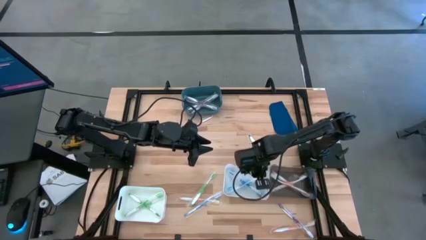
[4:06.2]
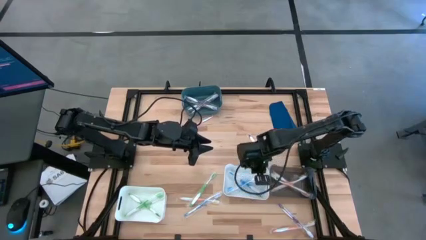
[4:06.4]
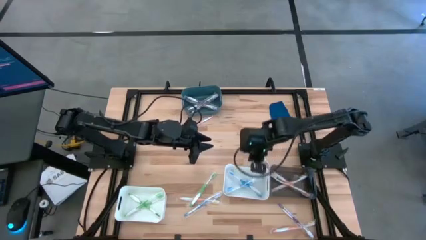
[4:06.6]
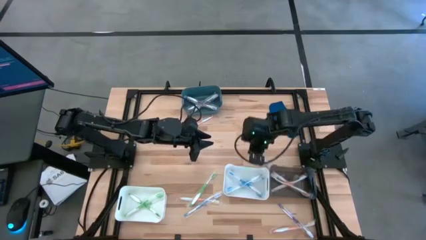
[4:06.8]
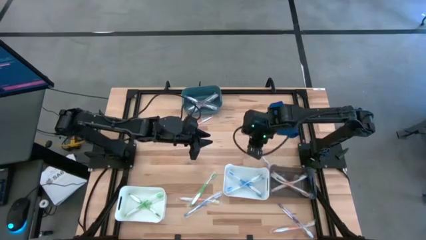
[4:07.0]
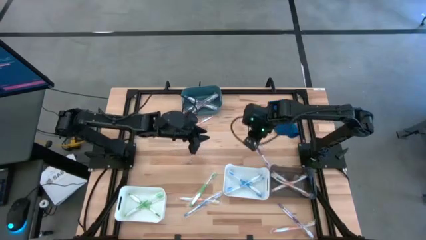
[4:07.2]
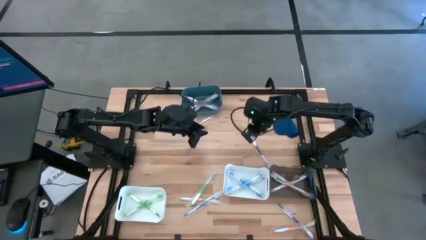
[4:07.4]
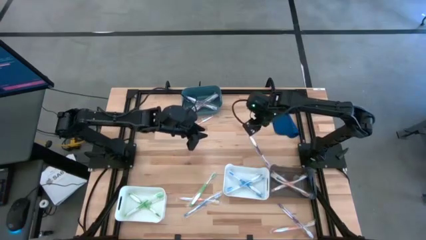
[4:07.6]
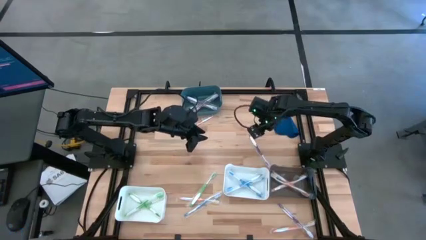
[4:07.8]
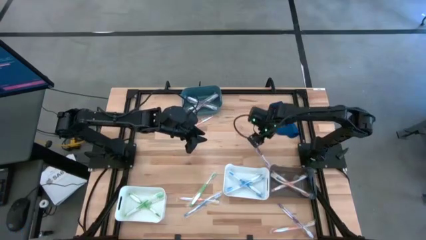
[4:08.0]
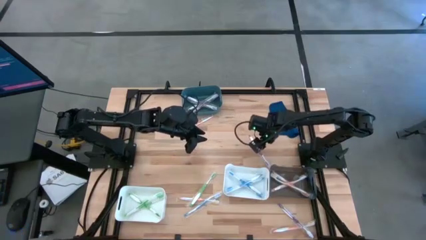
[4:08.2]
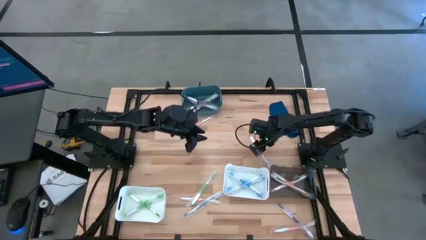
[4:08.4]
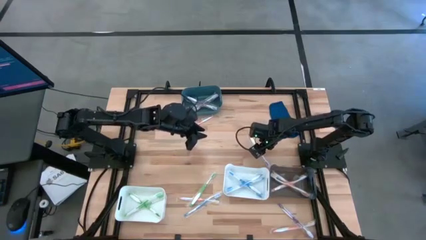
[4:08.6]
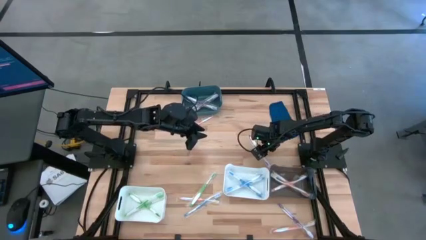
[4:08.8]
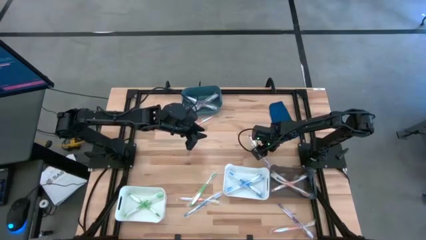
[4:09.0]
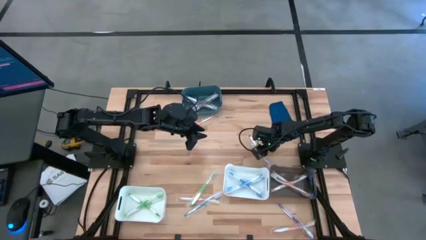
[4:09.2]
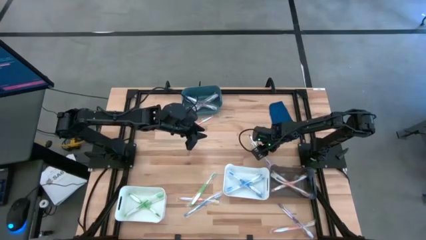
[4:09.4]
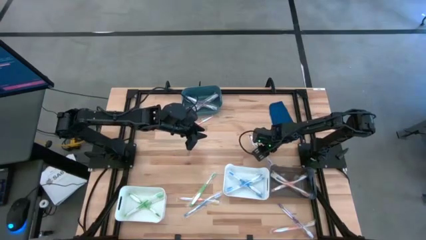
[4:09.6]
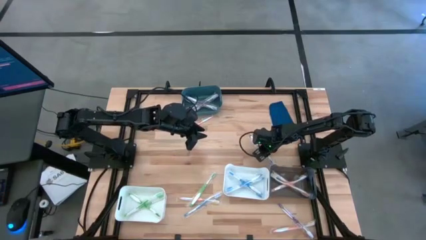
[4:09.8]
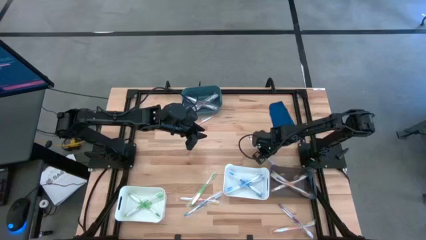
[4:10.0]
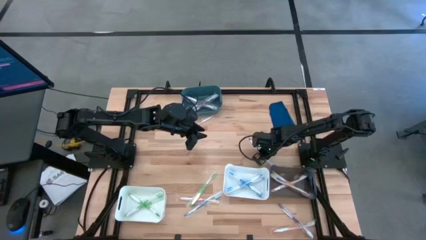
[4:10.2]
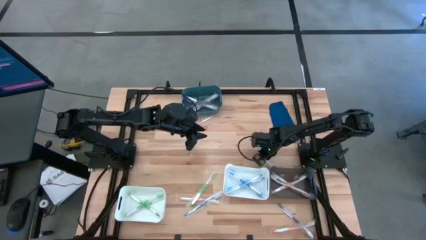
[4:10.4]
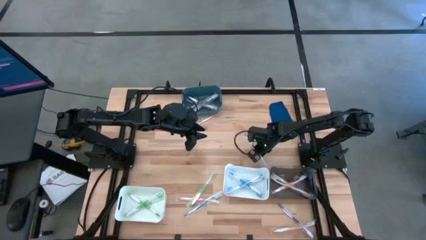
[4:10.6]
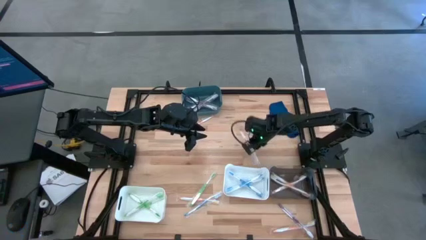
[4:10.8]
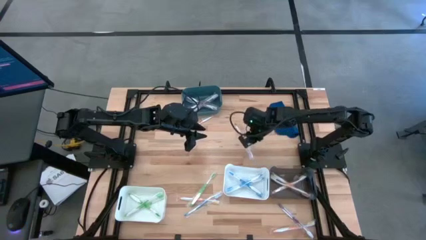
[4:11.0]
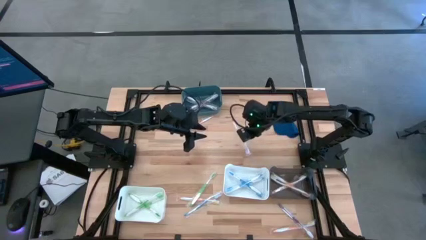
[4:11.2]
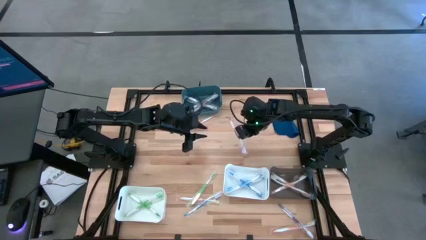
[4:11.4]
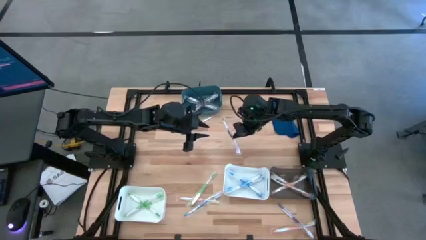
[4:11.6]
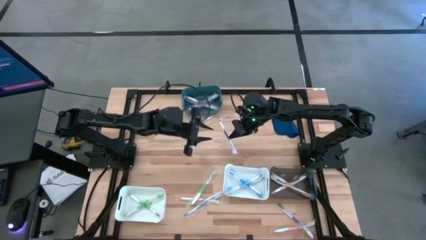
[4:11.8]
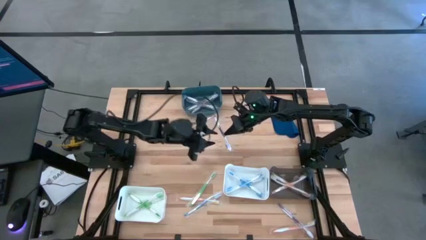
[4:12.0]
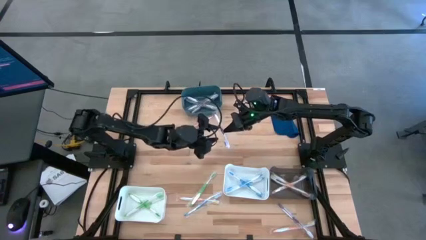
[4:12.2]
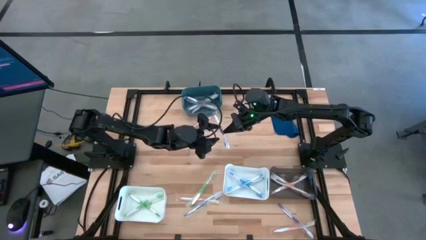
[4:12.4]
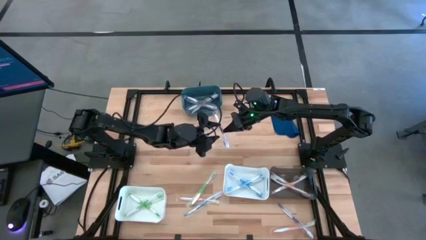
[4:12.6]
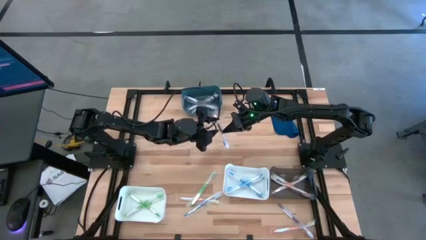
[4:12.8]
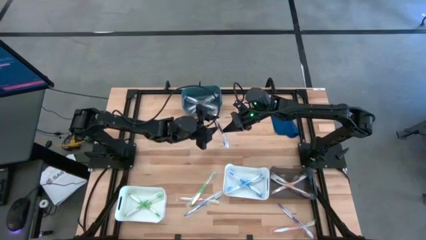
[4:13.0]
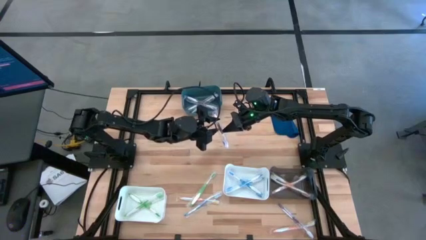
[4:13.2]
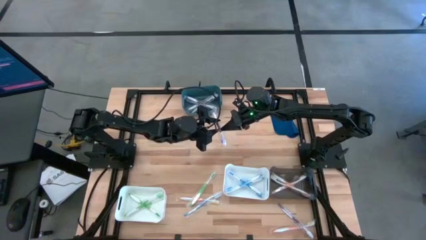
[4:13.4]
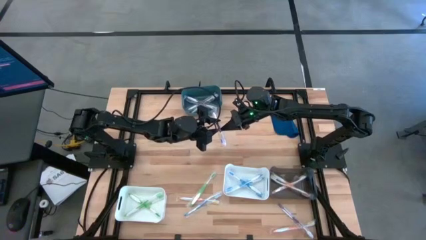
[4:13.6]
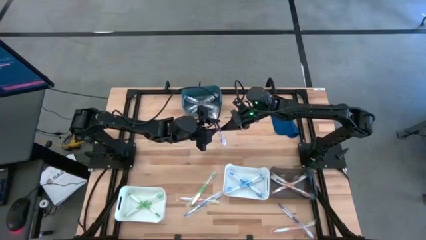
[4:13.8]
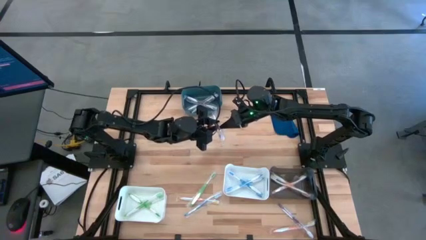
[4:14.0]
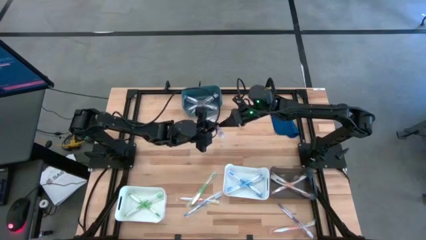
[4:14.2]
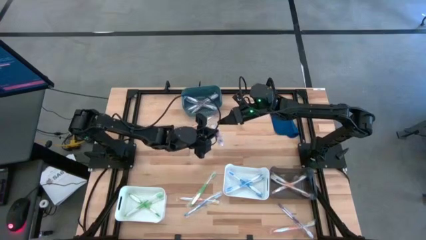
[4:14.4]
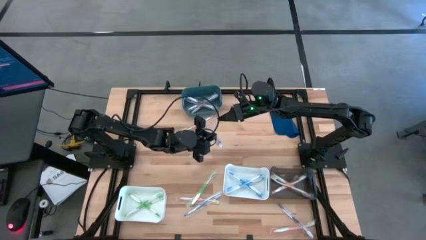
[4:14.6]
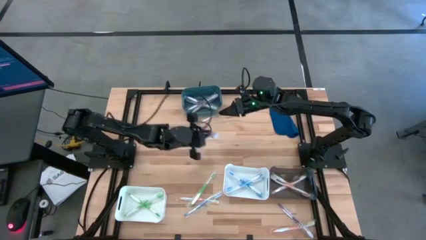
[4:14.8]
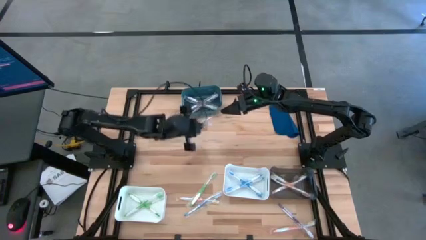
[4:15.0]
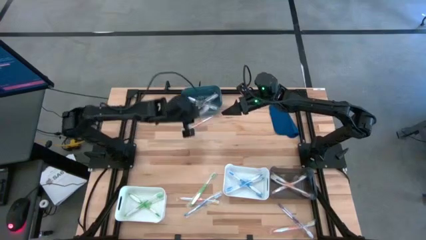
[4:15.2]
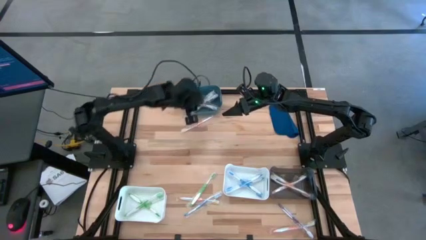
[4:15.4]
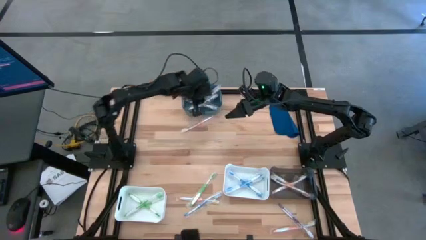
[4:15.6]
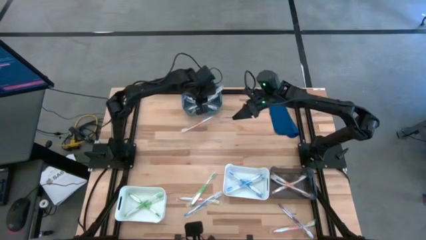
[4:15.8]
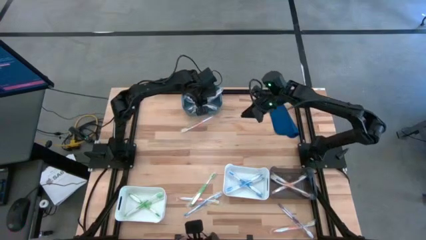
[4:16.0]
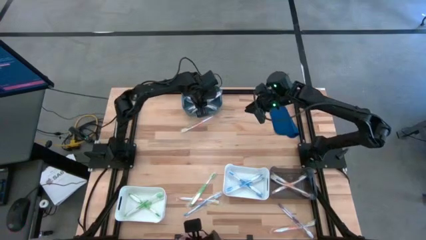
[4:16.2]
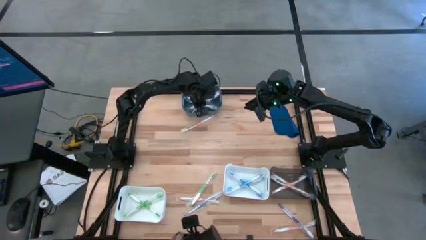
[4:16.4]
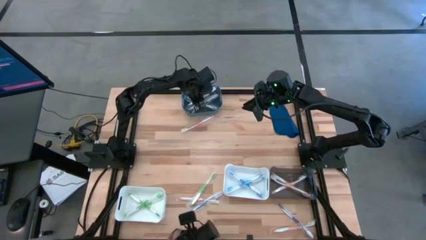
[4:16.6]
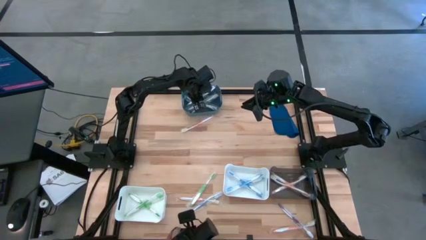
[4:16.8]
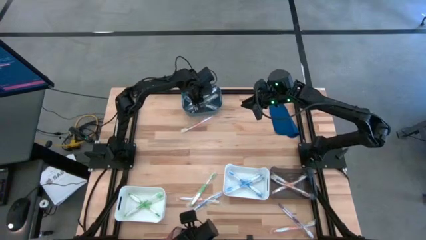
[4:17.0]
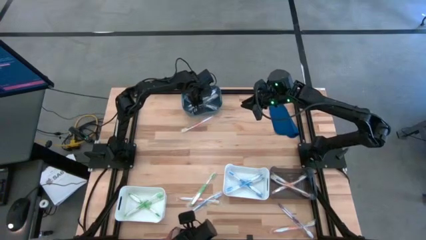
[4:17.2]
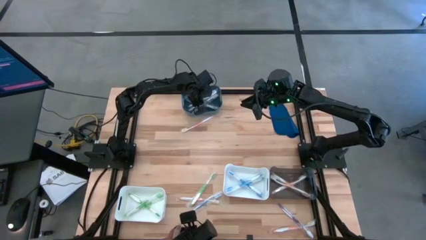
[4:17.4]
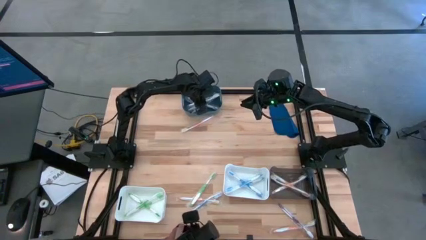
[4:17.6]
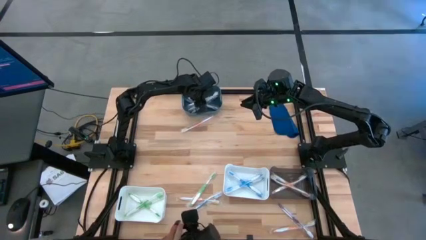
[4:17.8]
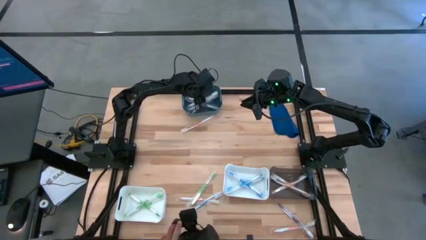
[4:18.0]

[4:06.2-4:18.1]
Task: Pick & Place Toothbrushes
Put the violet toothbrush into the blue bin

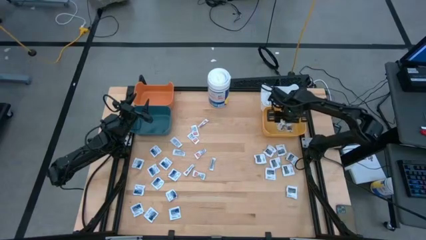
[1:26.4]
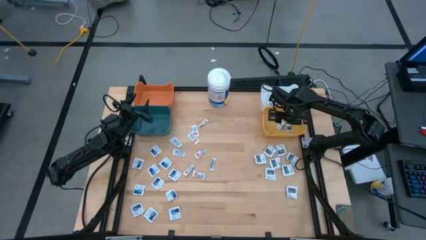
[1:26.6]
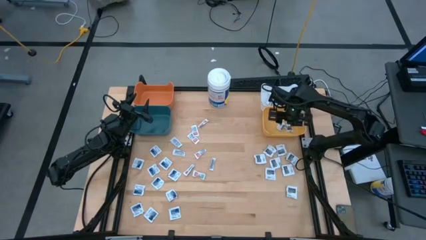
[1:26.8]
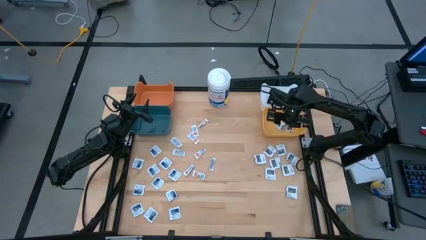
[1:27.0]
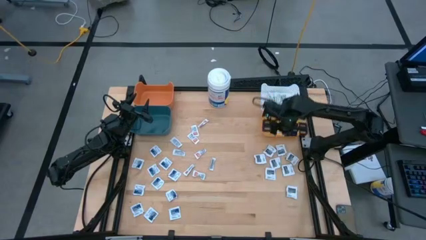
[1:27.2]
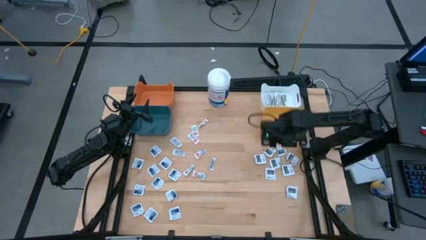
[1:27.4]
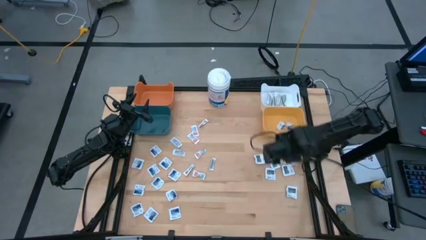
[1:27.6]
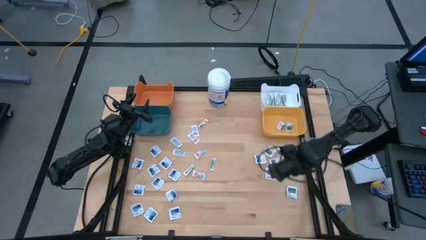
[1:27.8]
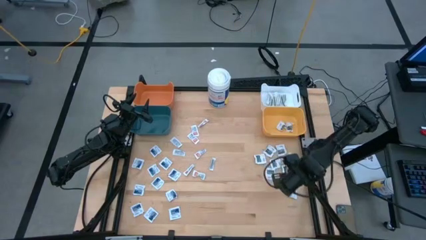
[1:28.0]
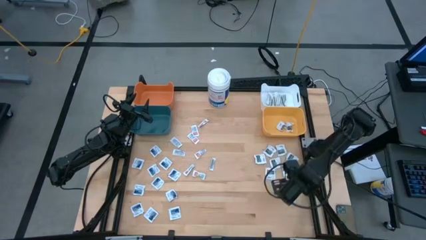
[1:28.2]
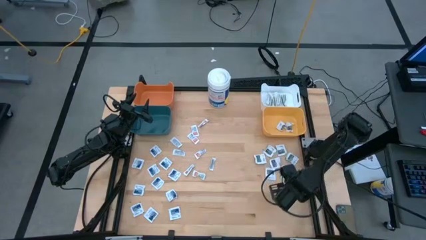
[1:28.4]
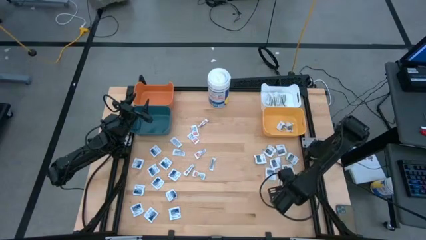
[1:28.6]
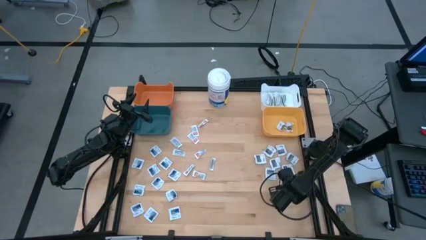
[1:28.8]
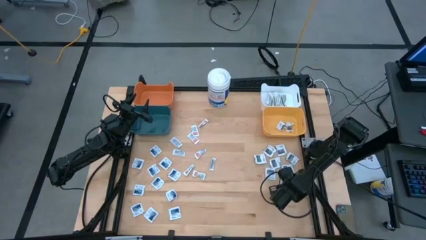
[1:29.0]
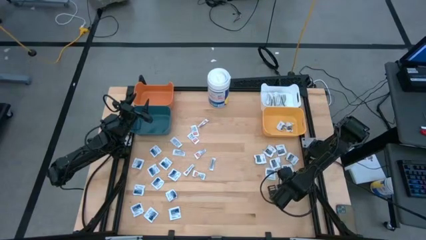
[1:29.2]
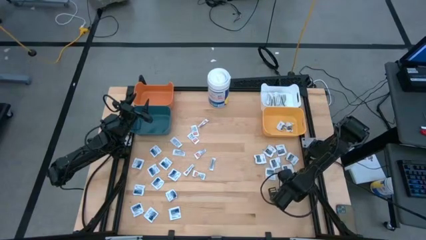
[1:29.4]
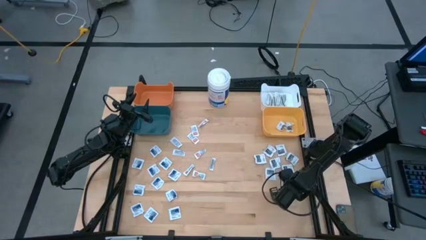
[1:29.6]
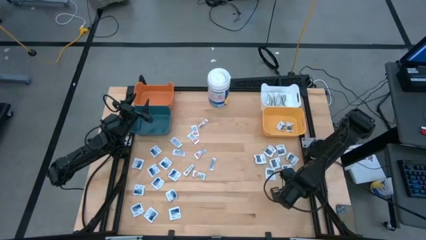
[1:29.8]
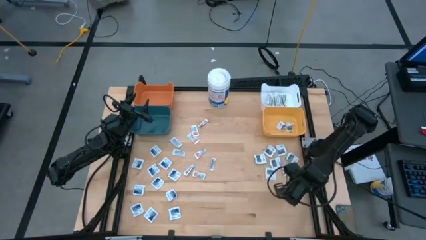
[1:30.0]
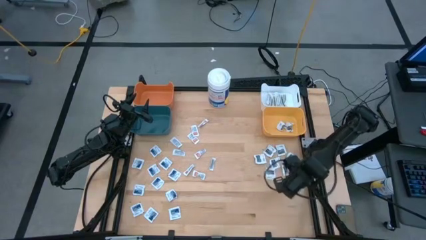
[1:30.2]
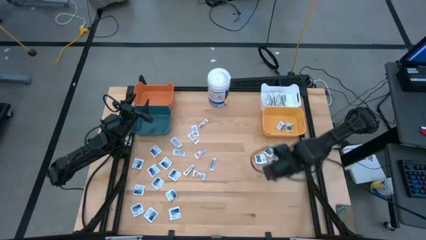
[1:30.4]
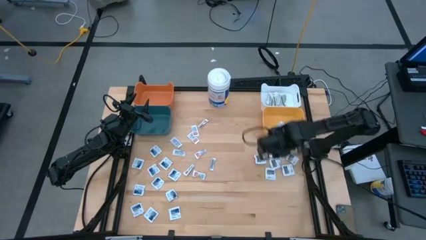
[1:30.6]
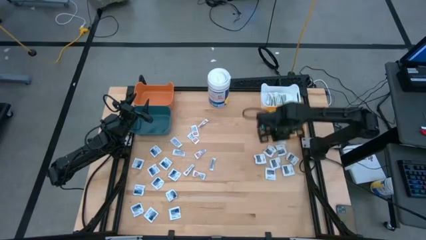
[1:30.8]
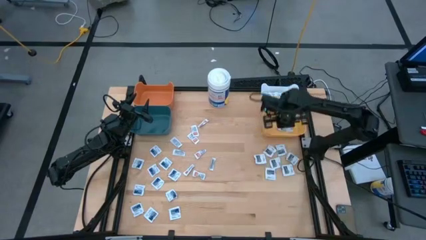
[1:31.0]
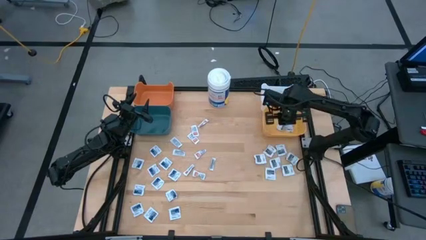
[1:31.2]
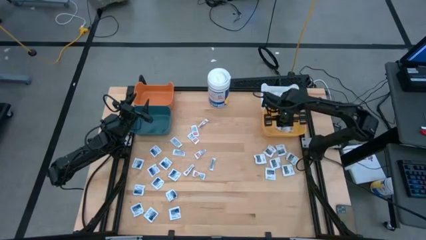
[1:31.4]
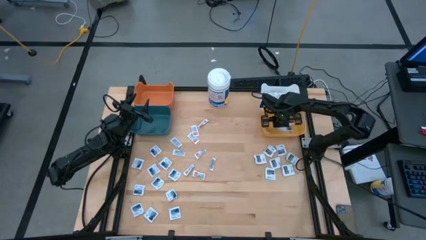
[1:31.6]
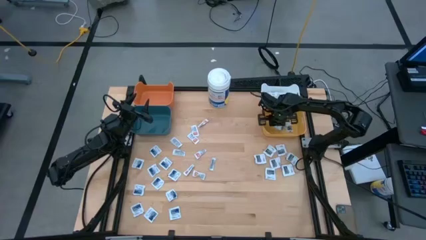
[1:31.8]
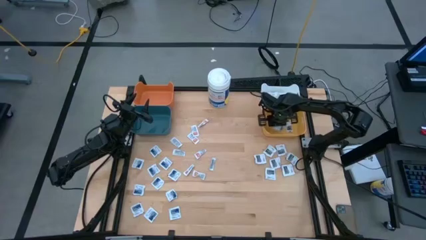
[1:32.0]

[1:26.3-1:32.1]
Task: Pick & Place First Aid Supplies
Put the black pad into the yellow bin
